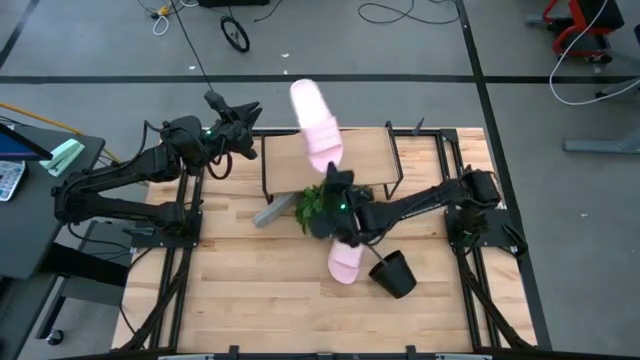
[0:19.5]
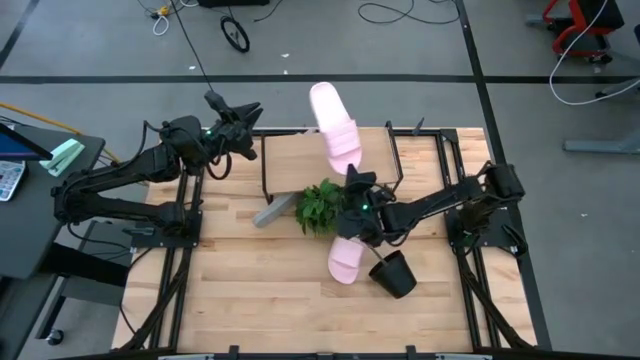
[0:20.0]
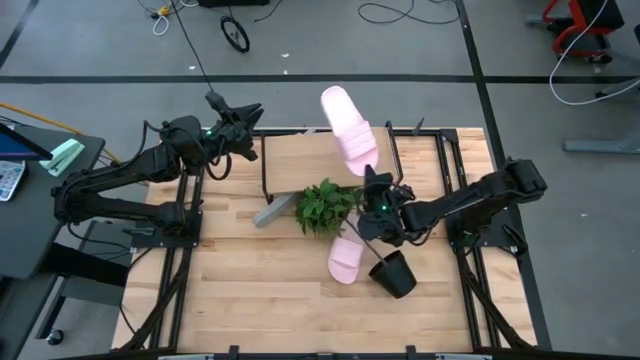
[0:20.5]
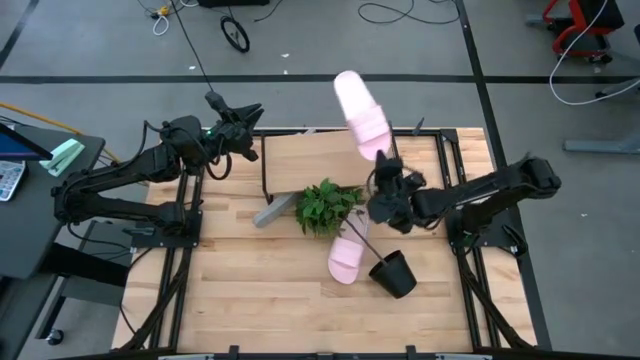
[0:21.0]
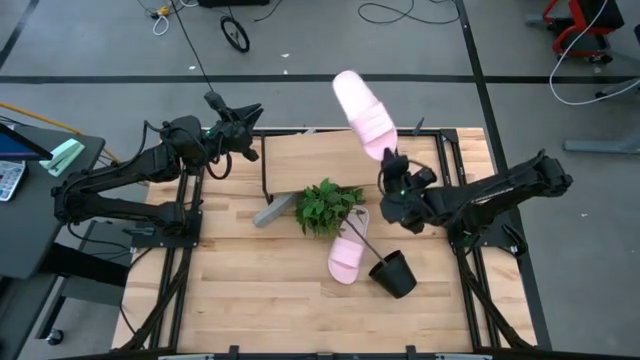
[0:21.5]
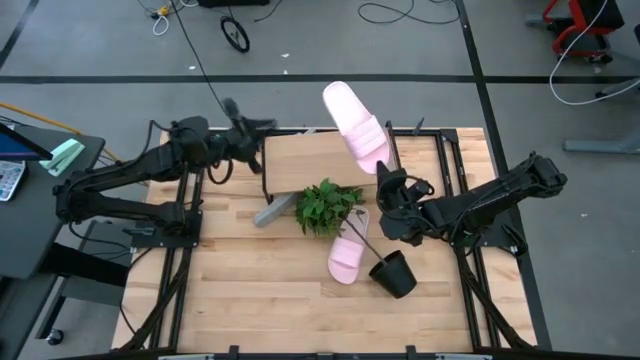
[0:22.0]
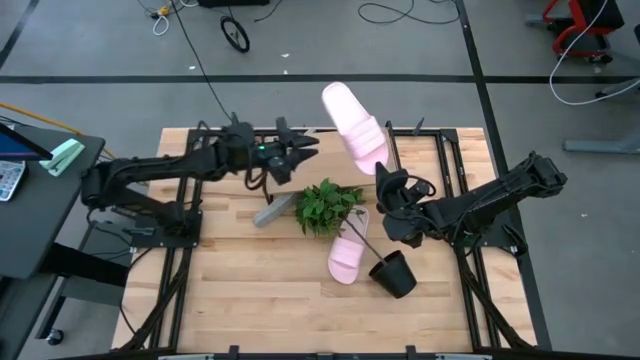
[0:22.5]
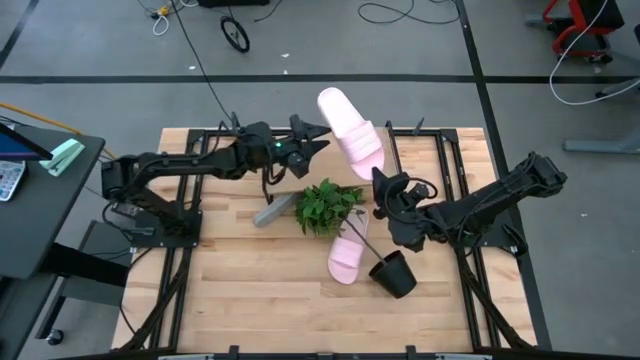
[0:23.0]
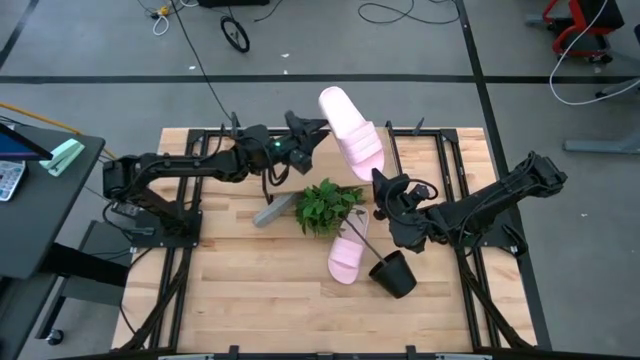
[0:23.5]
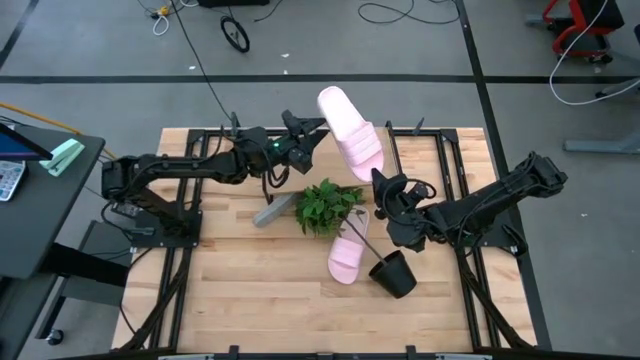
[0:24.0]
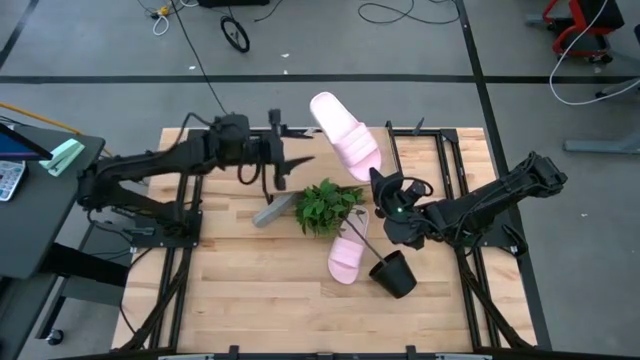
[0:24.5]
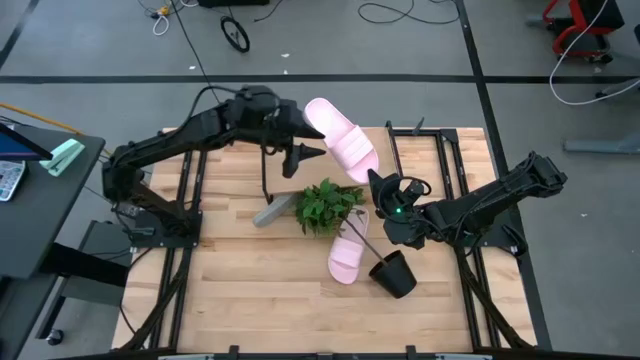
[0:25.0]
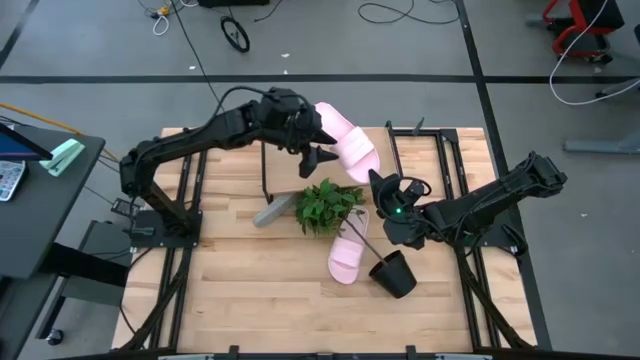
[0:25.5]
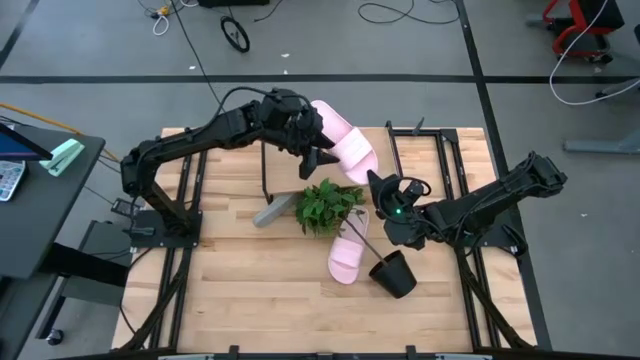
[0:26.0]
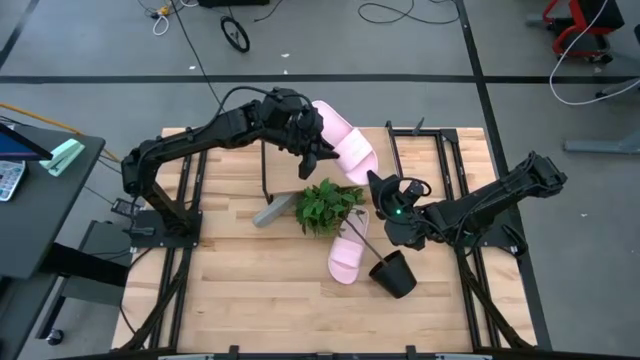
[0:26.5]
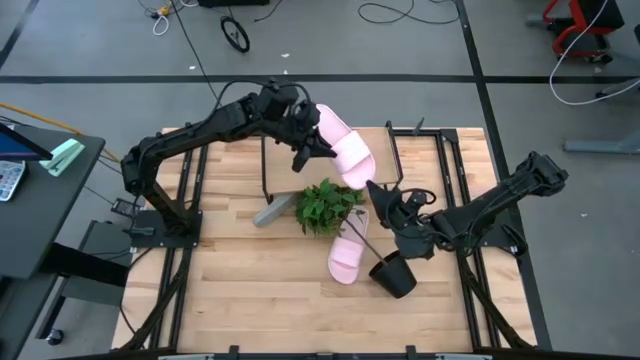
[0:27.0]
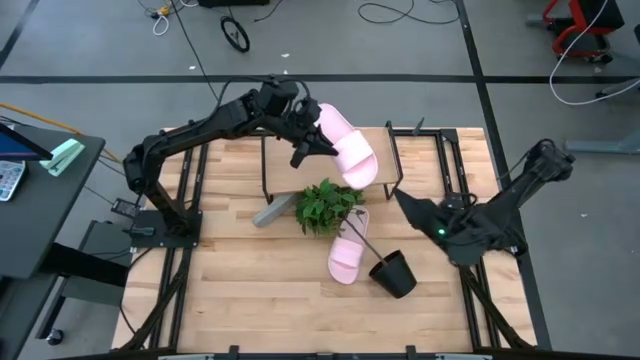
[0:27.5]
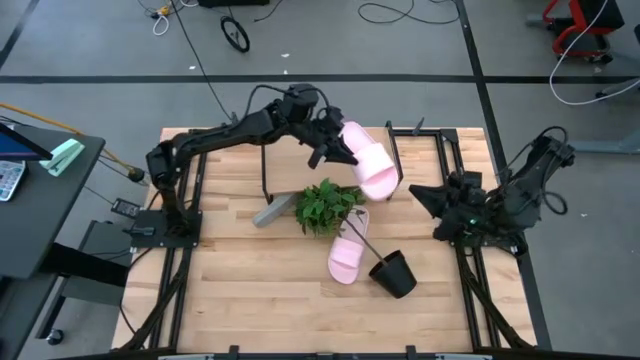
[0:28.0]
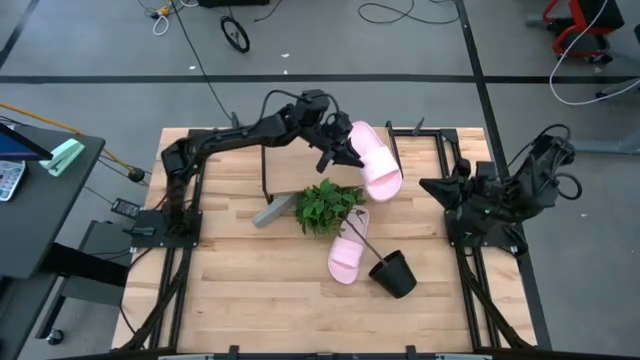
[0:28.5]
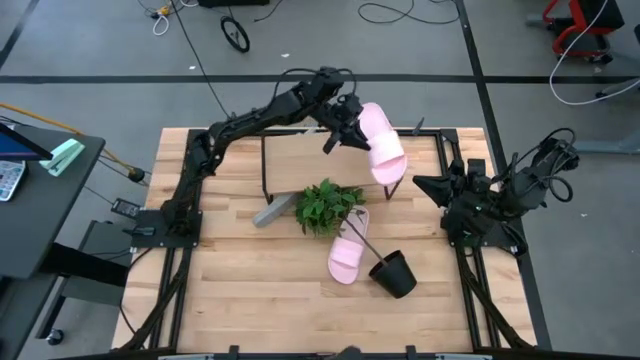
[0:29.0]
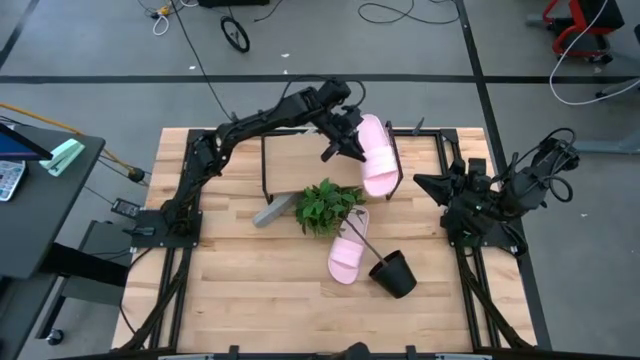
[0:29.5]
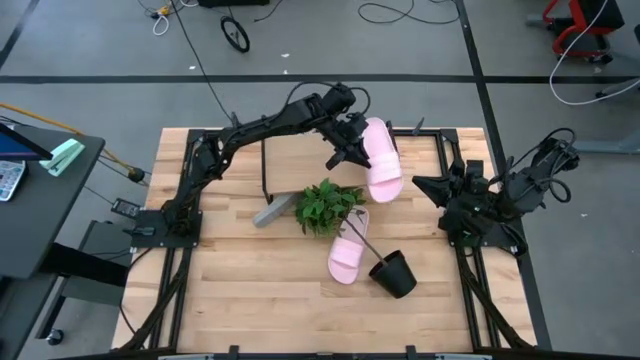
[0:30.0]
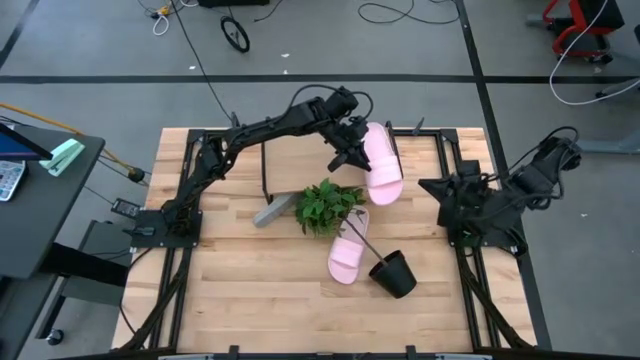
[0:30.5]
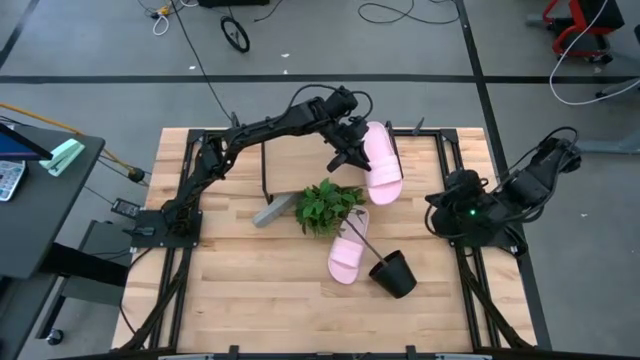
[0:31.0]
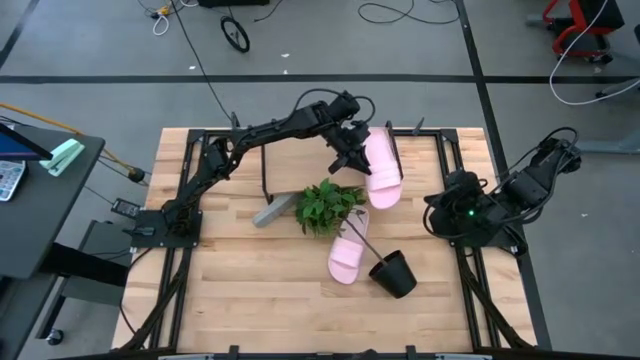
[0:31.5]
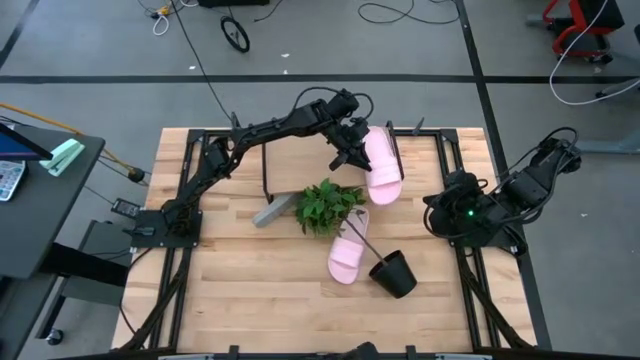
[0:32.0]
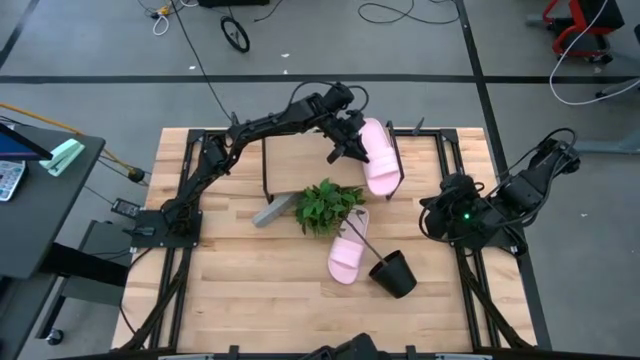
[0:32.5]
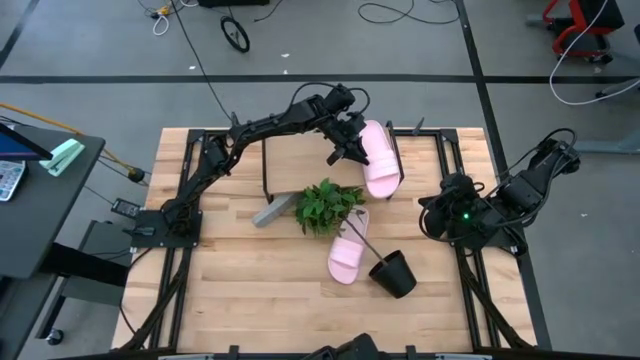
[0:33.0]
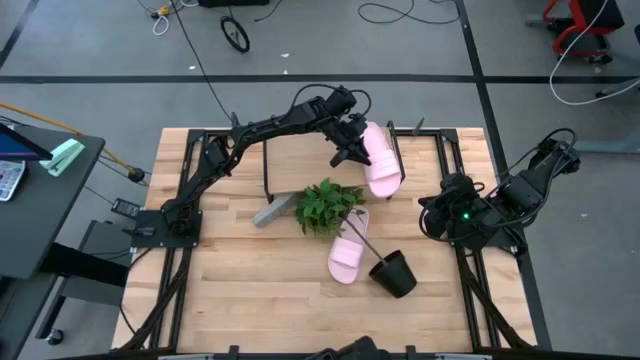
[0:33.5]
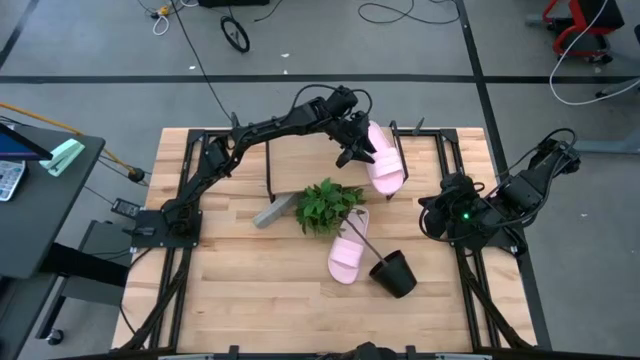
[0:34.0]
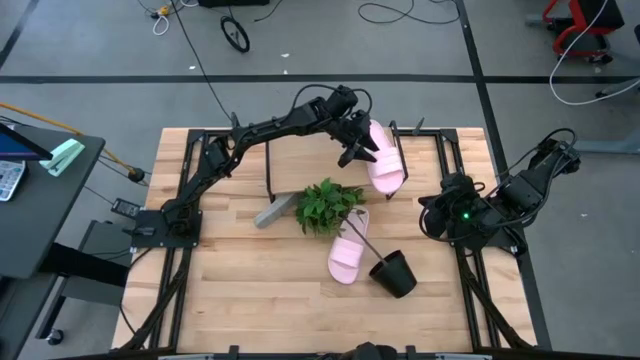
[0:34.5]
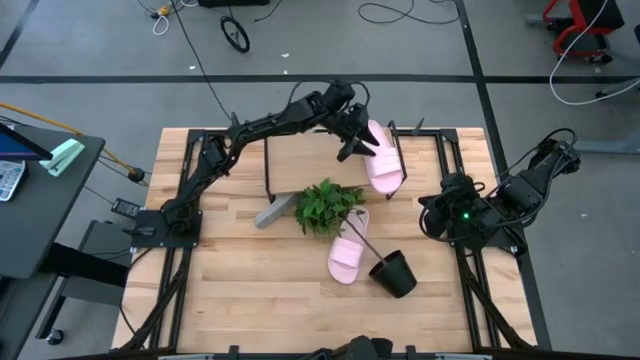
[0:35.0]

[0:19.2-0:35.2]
Task: Pick and place slides into the shelf
Put the top pink slides on the shelf

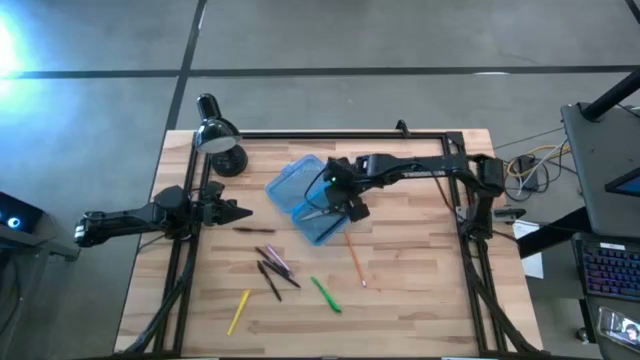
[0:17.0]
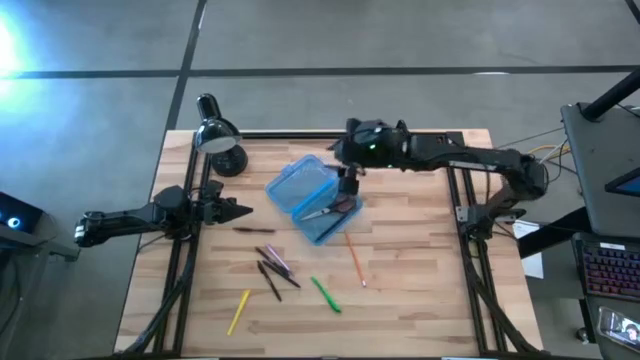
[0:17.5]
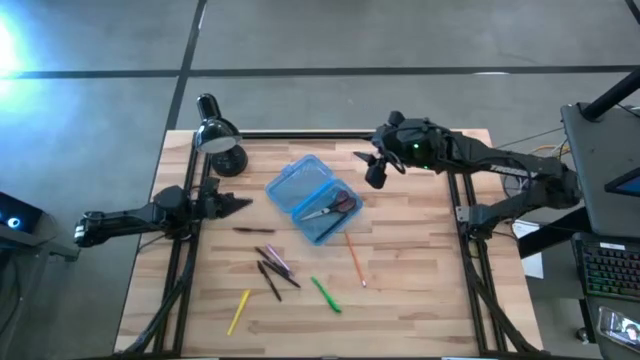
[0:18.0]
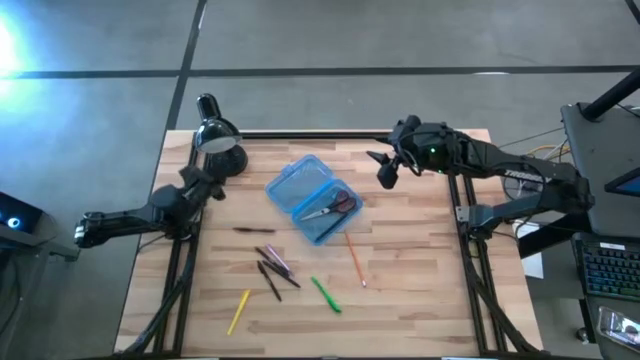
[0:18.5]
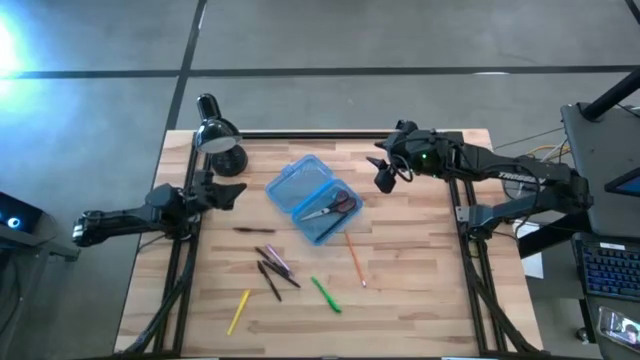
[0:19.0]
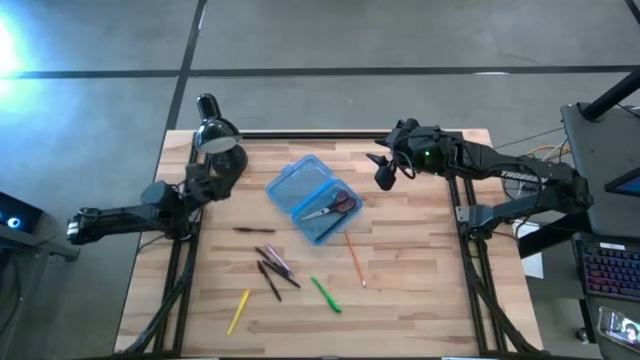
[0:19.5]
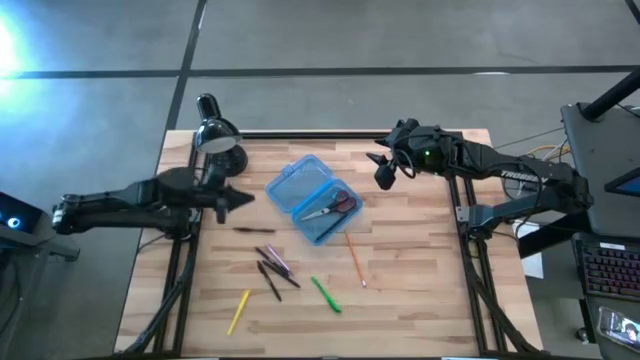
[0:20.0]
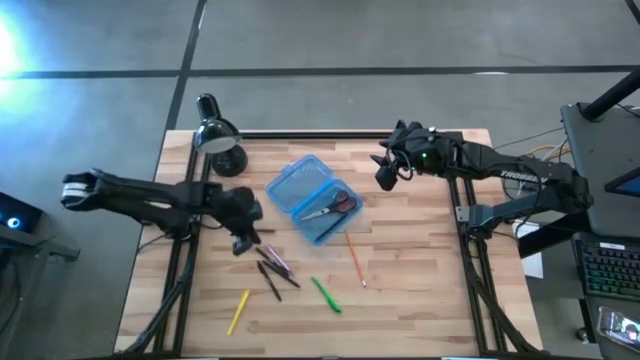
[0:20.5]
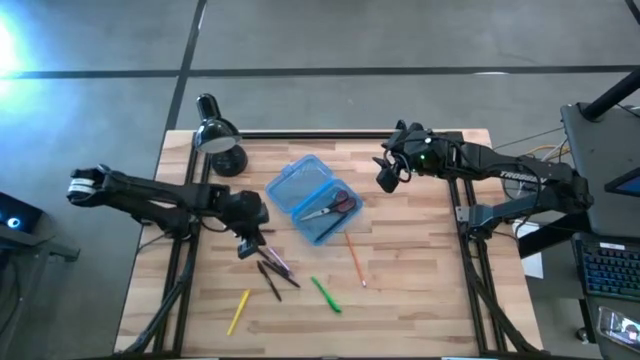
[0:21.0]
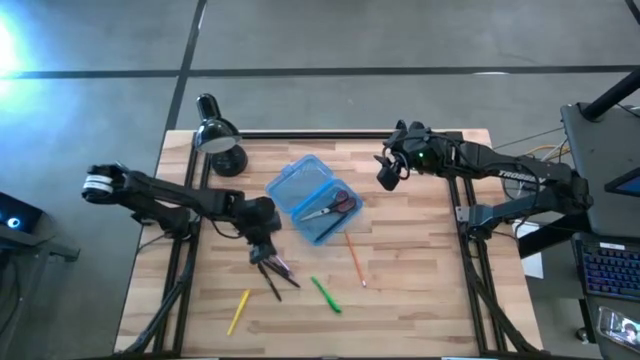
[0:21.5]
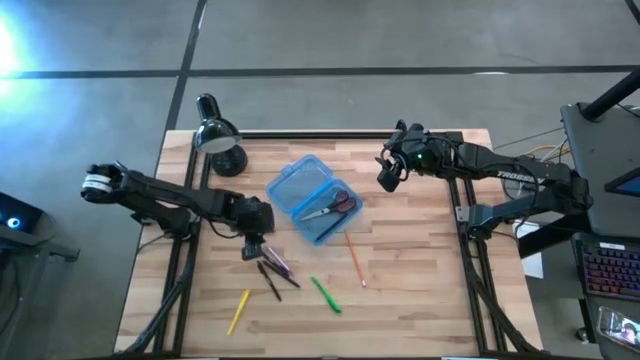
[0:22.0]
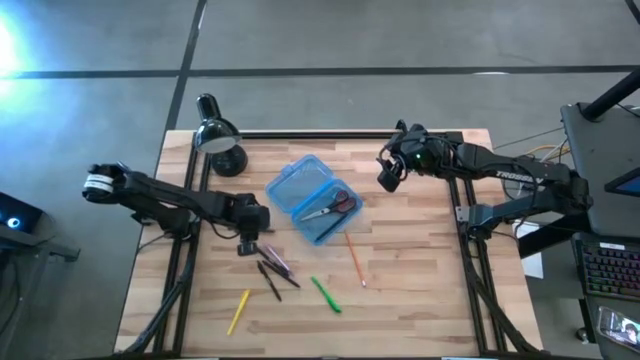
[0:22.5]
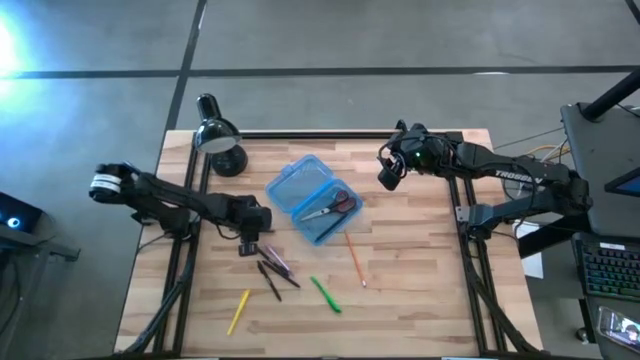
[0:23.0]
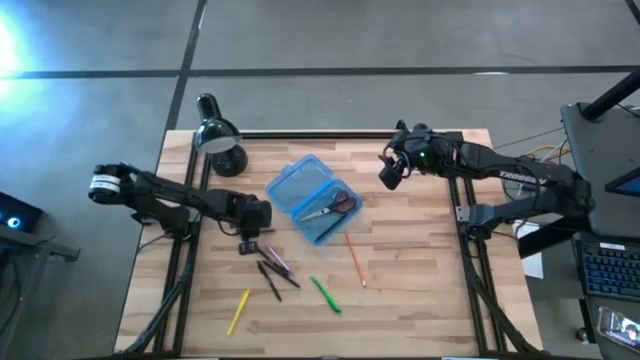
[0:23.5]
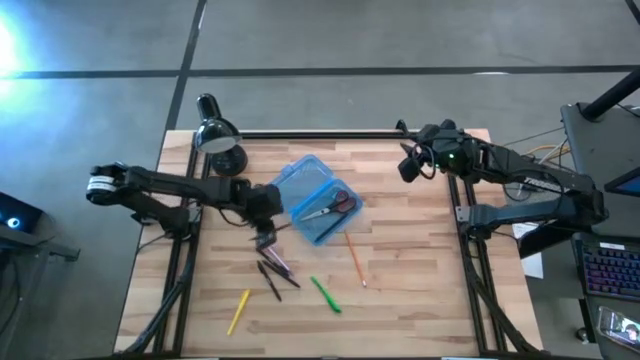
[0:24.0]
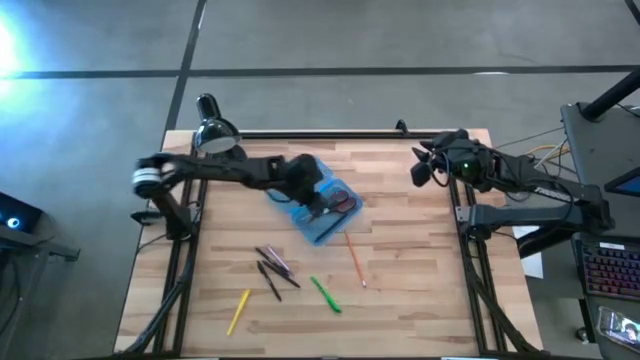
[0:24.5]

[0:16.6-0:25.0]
Task: Pick & place school supplies into a supply box
Put the brown pen into the supply box
